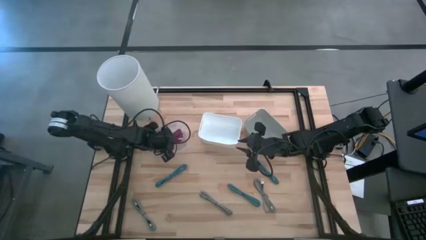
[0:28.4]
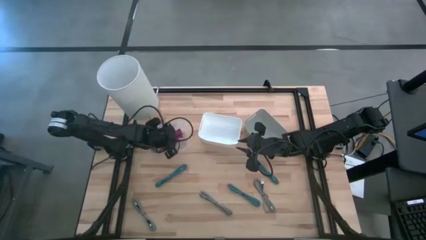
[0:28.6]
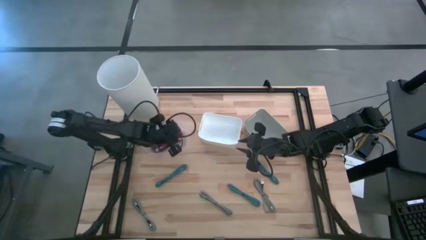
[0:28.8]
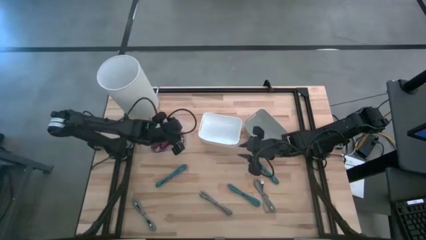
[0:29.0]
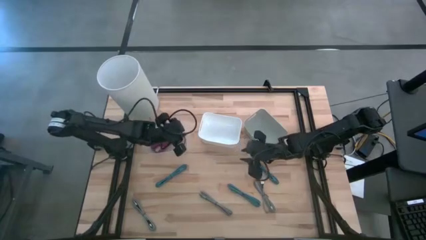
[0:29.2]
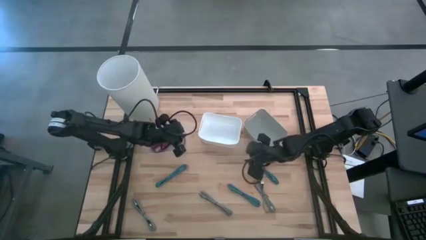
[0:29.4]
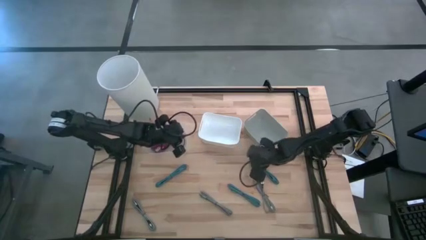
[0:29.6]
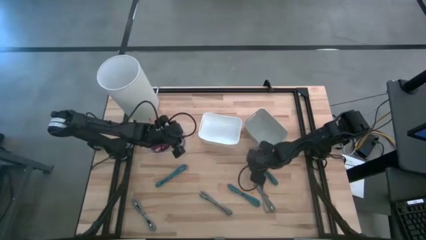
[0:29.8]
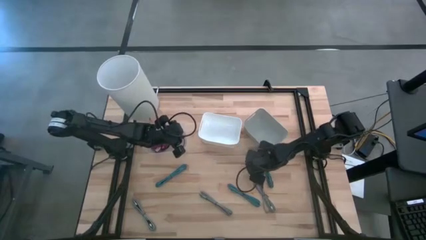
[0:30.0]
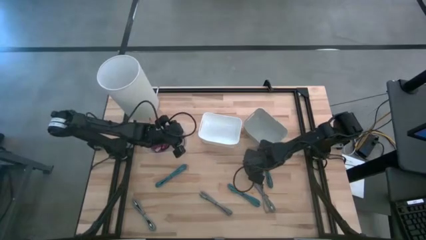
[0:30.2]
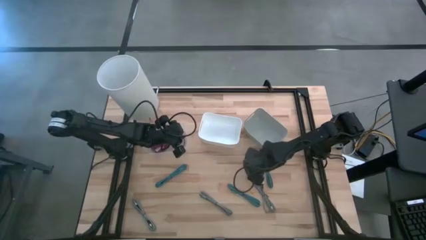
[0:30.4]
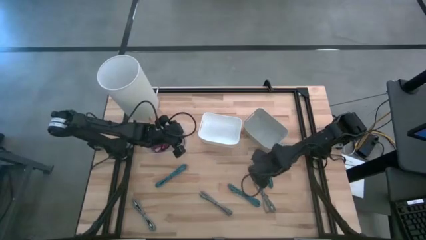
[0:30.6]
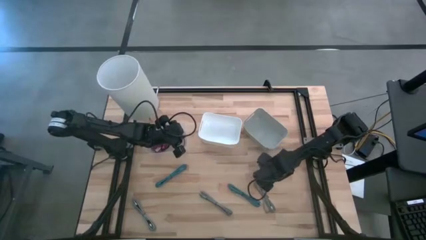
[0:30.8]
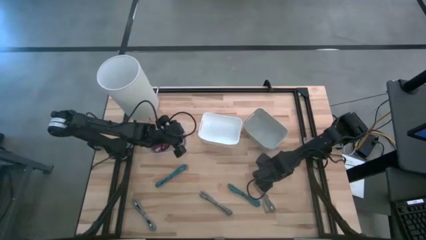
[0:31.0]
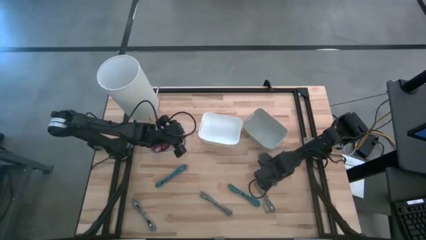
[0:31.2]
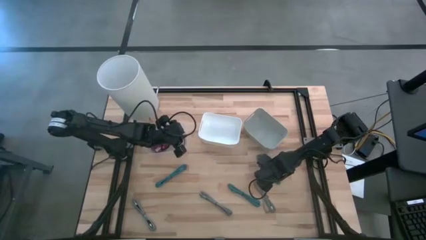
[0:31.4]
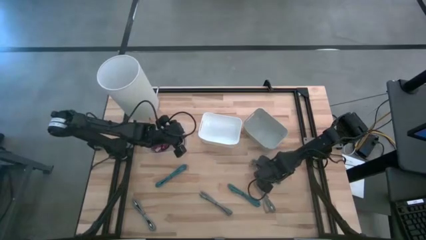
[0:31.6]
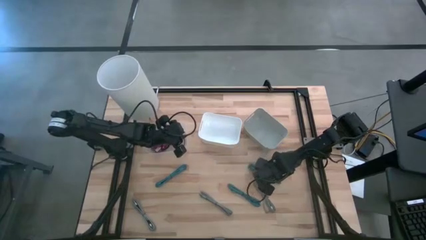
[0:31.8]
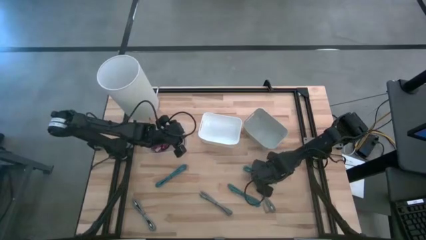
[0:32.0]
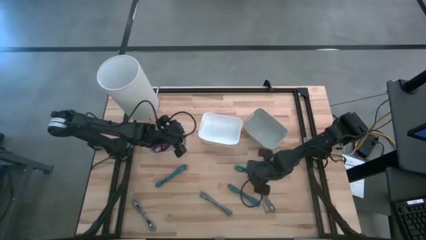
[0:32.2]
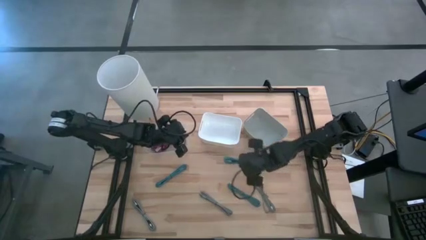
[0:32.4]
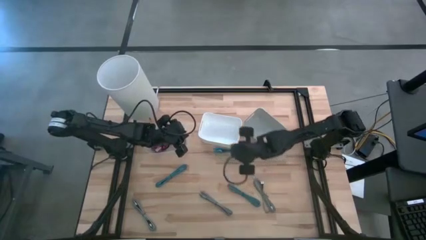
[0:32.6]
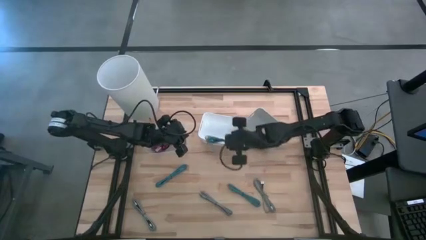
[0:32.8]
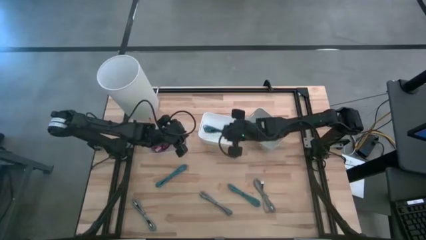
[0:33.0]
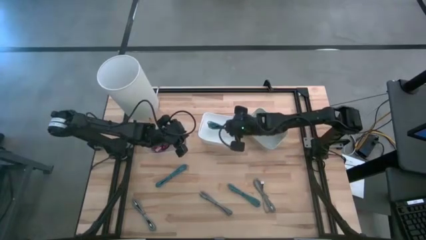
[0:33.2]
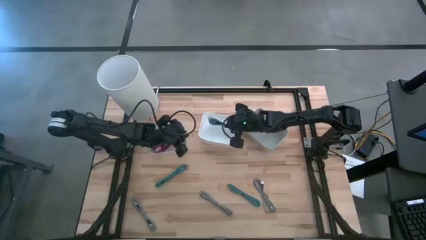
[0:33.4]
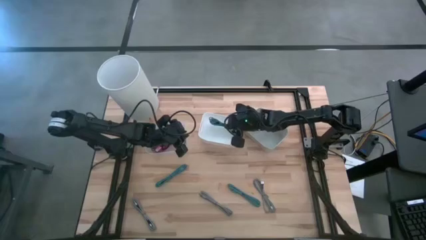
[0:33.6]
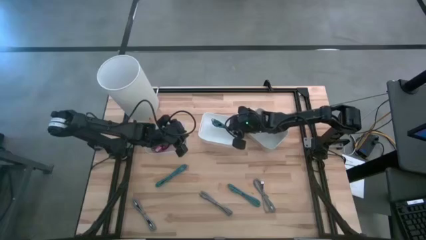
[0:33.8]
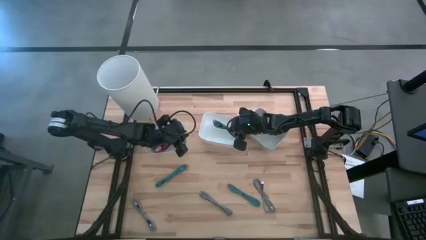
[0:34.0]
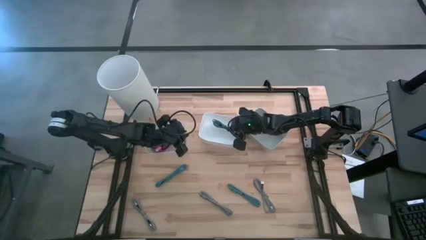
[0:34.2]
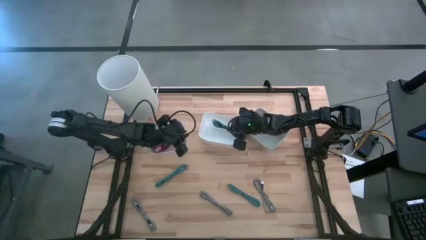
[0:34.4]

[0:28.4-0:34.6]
Task: Pick & Place USB Port
Put the right blue patterned charger cable into the white bin

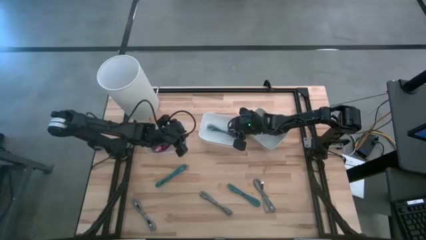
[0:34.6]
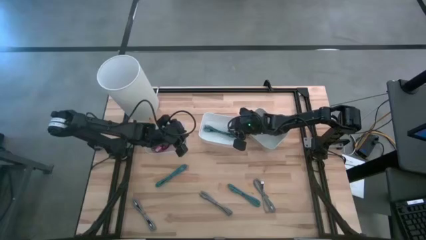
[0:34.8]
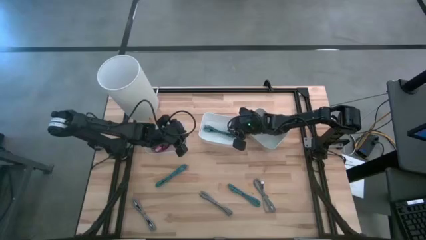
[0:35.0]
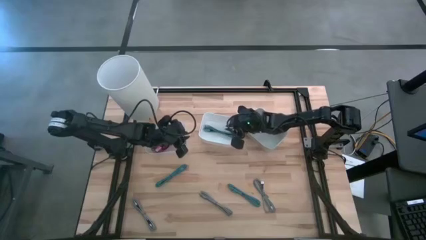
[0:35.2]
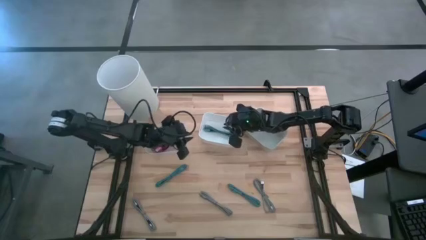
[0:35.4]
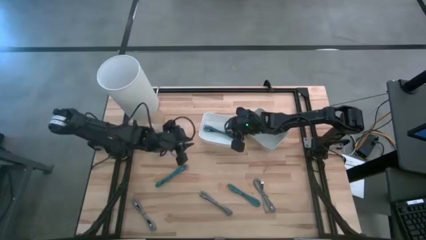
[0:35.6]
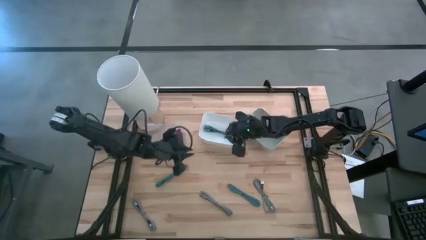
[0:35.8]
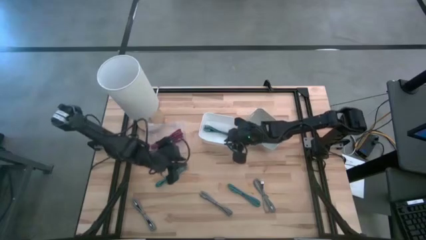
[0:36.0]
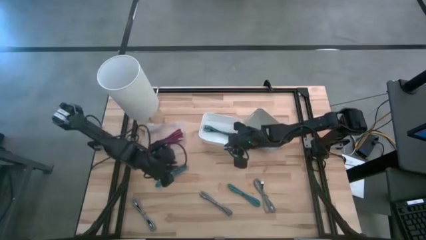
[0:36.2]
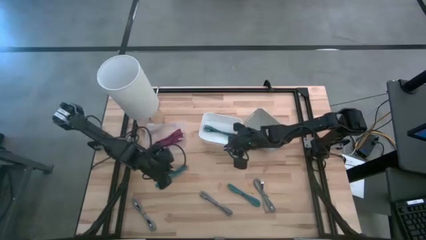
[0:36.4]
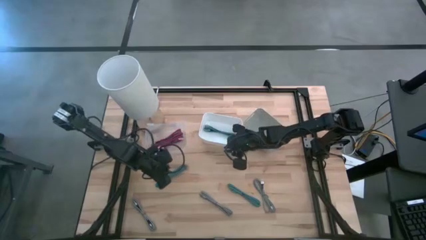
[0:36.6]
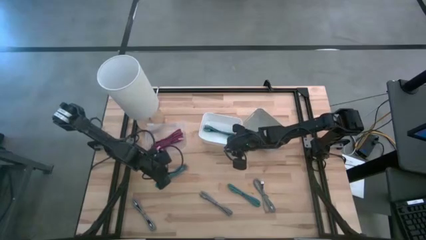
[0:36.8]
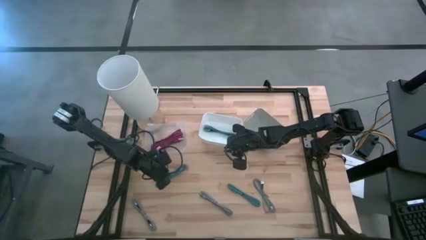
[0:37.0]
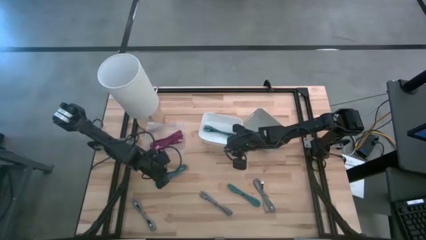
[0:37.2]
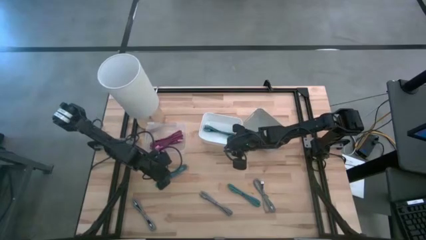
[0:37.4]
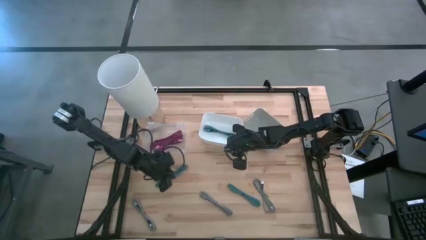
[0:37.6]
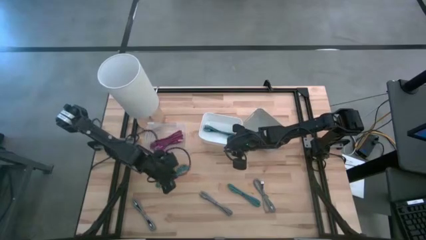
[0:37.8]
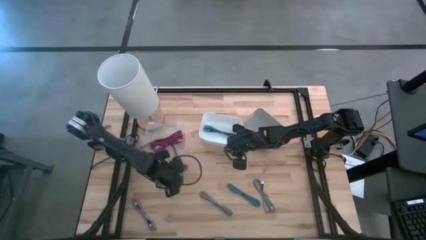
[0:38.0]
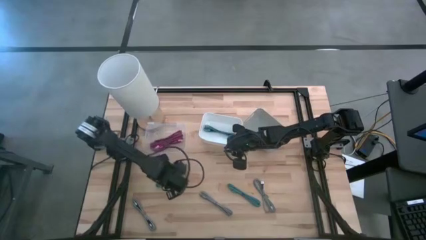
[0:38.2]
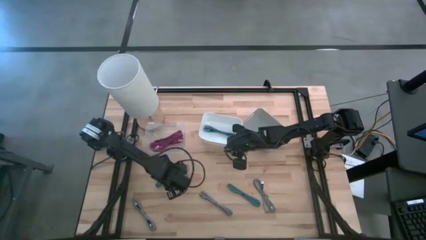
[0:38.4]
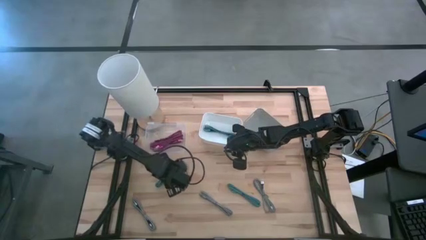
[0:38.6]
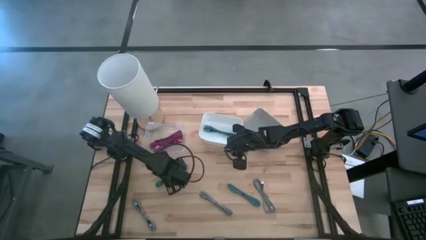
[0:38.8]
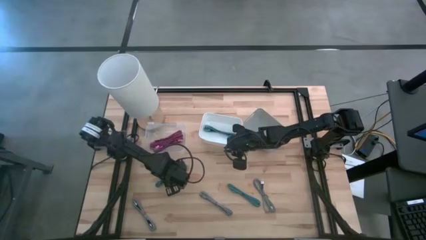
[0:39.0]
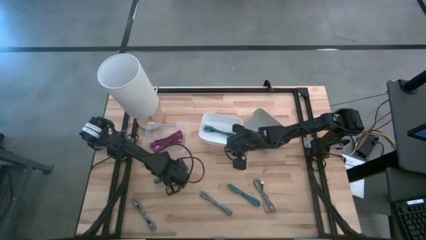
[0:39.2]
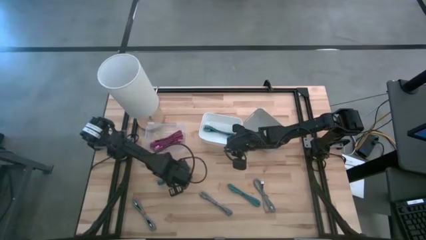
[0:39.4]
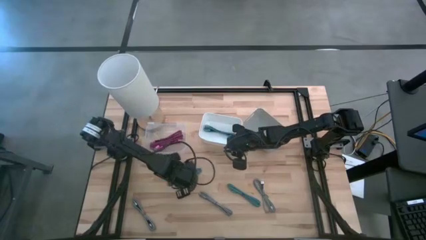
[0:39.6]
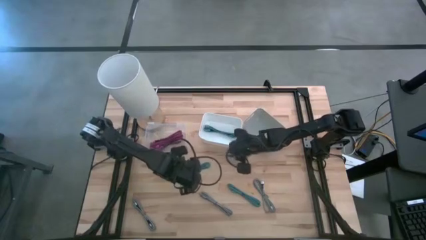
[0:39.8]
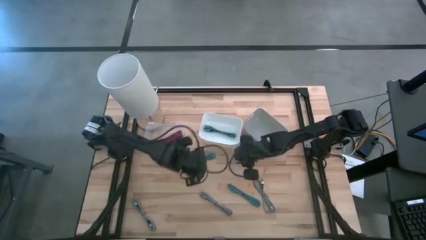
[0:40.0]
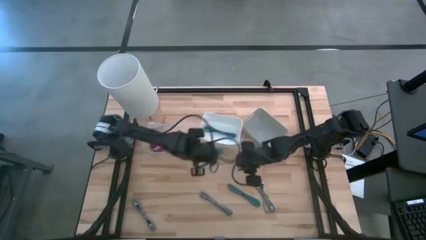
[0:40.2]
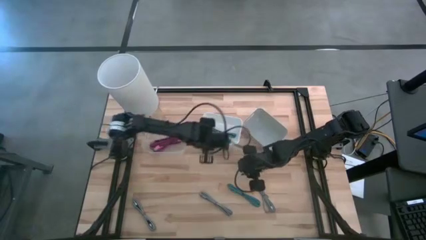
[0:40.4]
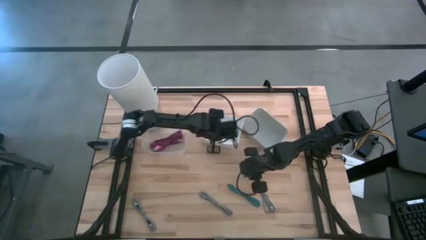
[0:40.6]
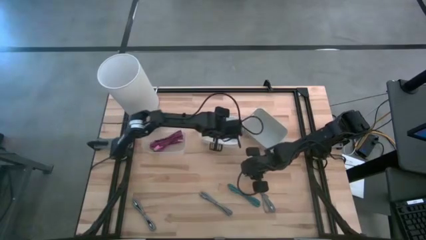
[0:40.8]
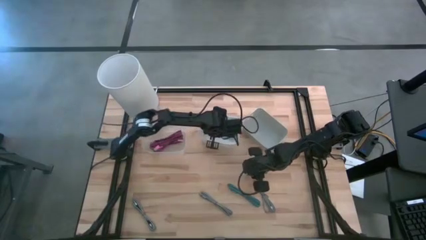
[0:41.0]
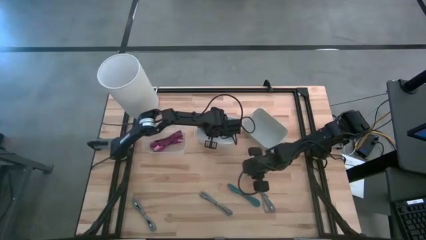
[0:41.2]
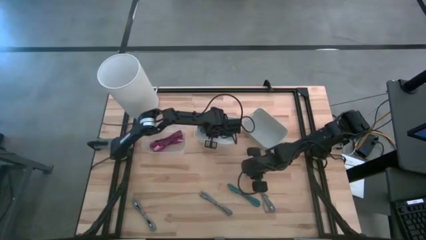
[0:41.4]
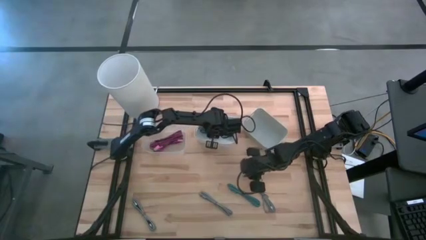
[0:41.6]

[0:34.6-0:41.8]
Put the left blue patterned charger cable into the white bin

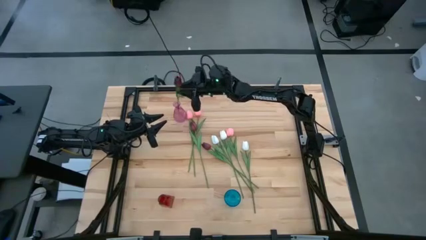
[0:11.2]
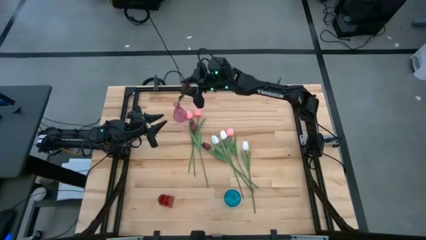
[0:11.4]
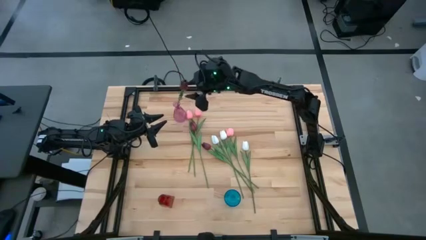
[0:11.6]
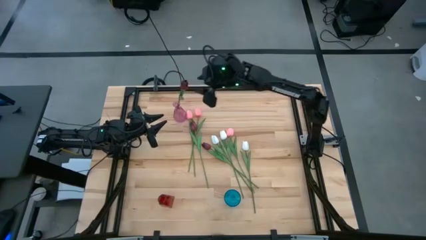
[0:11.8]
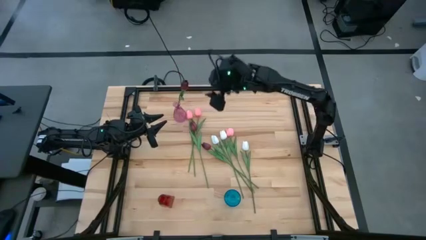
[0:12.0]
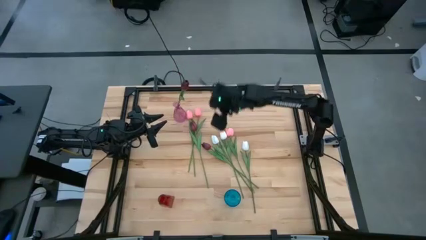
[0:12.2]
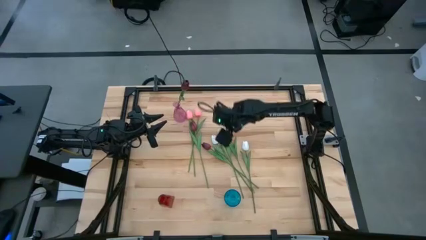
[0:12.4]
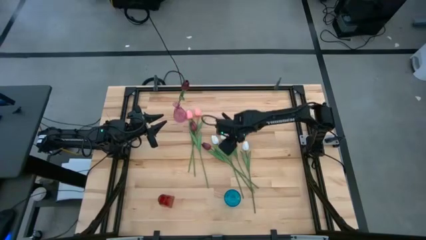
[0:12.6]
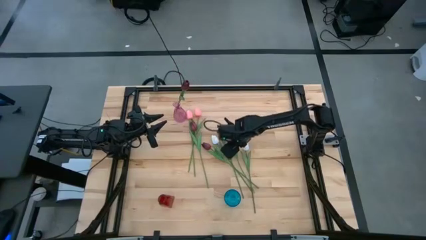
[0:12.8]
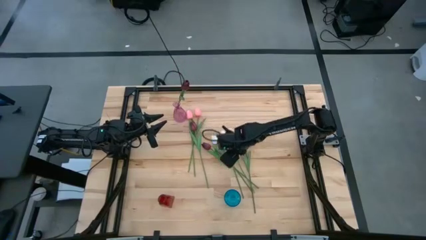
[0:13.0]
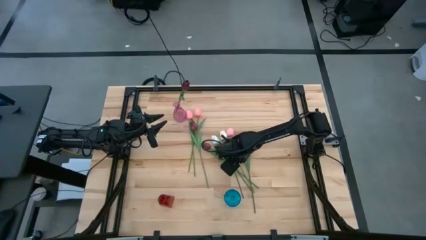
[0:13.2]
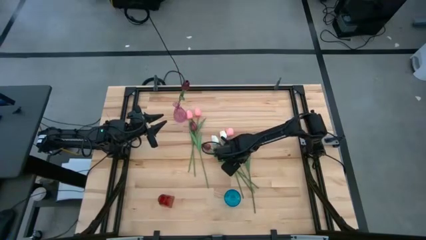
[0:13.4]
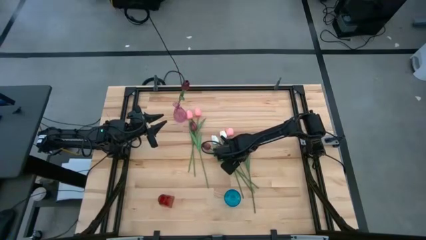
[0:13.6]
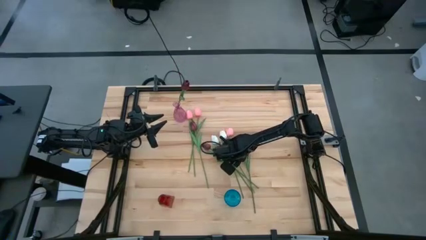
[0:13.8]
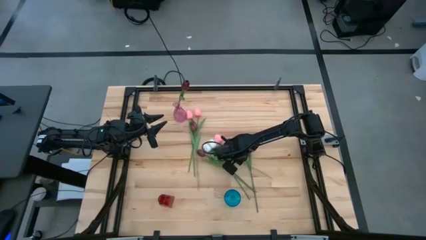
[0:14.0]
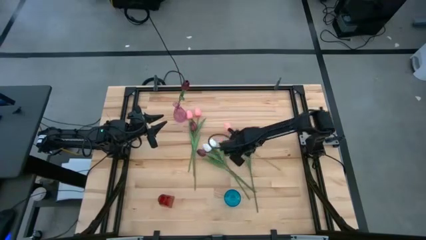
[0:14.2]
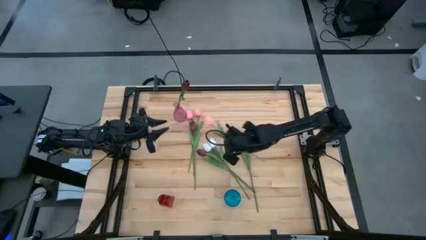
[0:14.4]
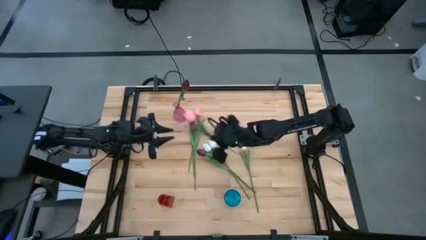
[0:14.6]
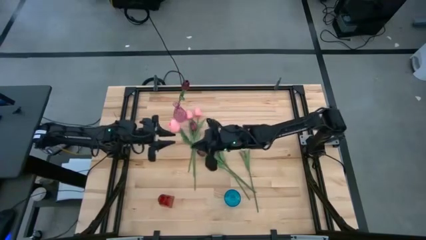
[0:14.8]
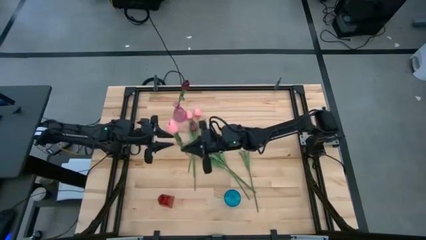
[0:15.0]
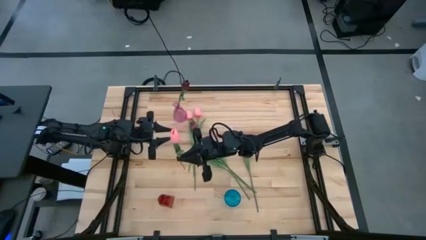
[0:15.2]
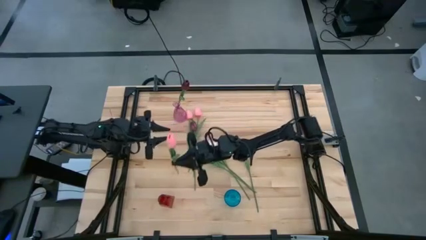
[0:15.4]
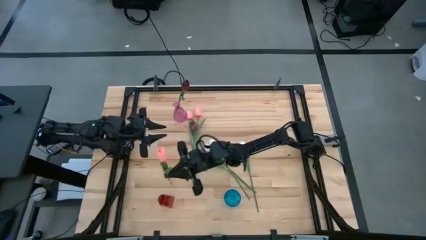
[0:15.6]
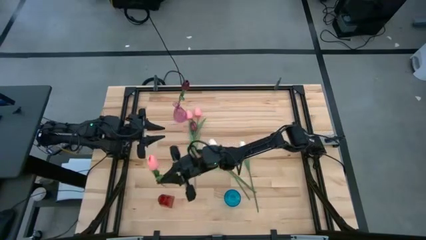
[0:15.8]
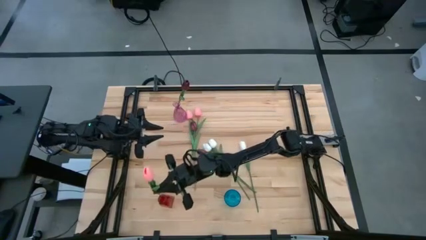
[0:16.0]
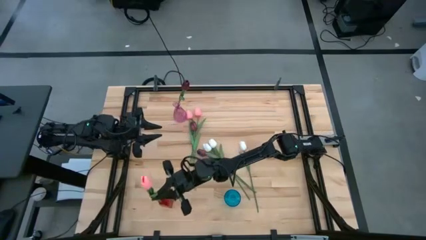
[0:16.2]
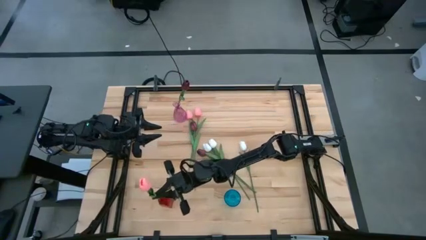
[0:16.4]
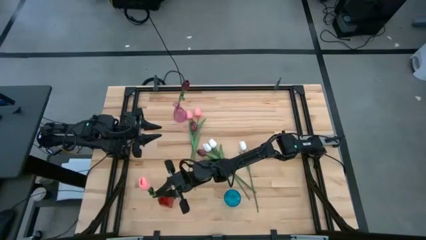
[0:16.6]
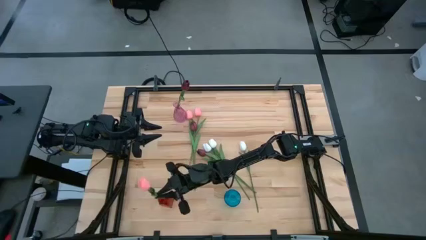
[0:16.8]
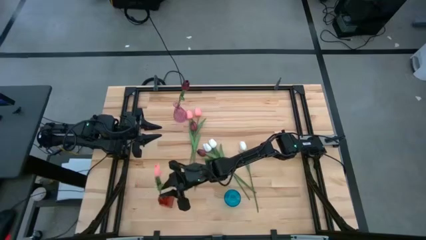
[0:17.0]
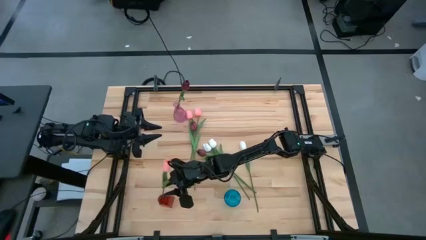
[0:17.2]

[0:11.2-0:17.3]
Task: Sort flowers into vase by color
Put the bottom pink flower into the red vase
